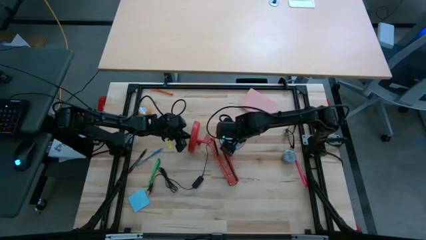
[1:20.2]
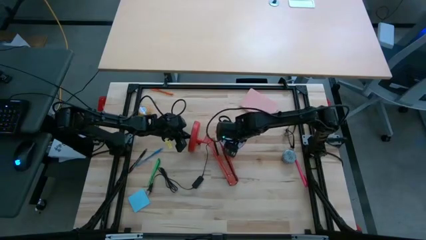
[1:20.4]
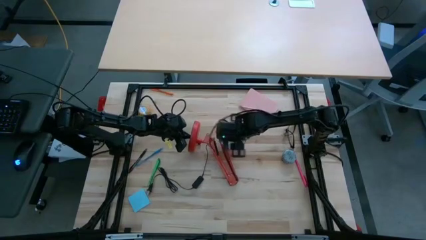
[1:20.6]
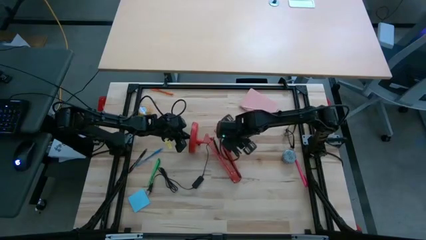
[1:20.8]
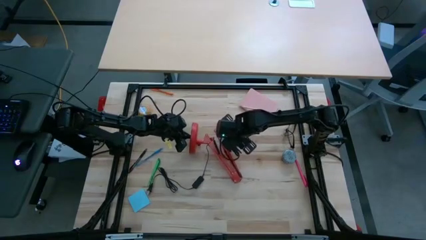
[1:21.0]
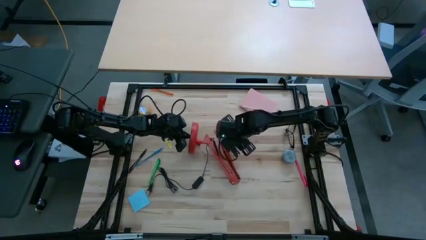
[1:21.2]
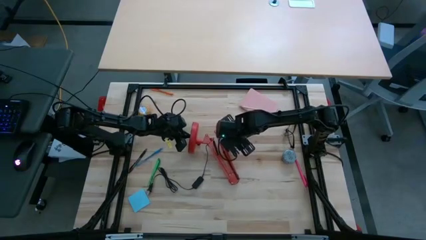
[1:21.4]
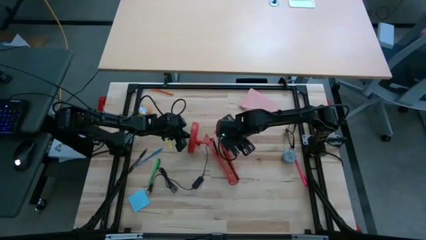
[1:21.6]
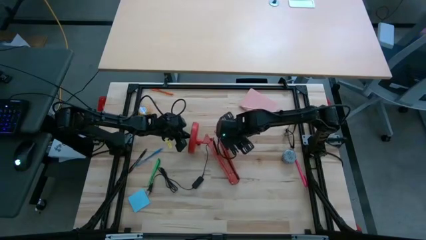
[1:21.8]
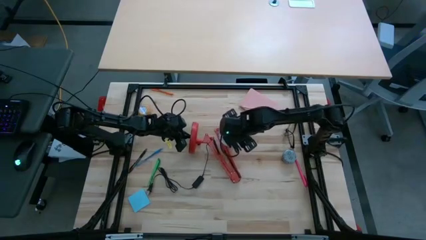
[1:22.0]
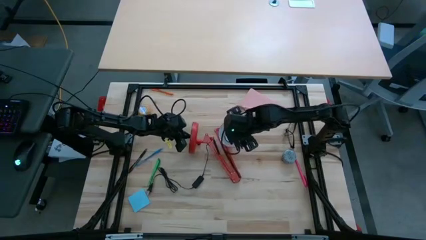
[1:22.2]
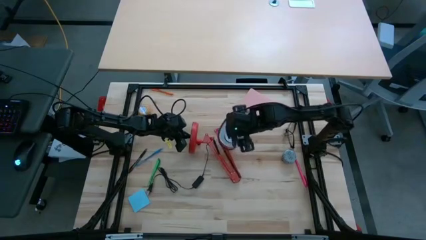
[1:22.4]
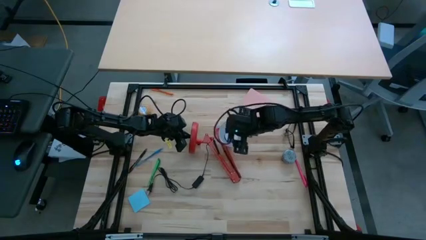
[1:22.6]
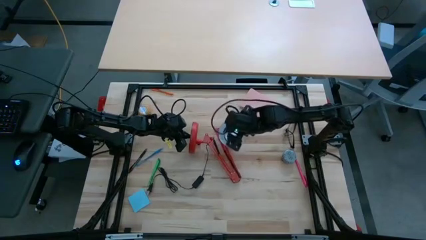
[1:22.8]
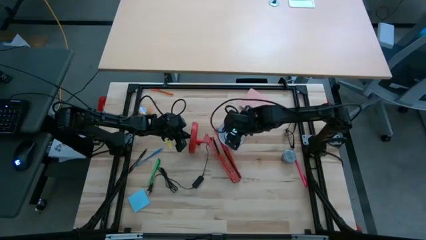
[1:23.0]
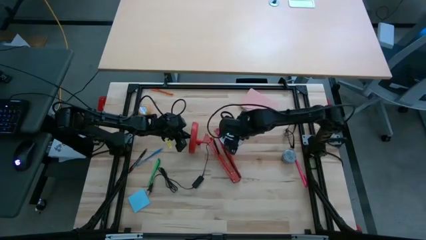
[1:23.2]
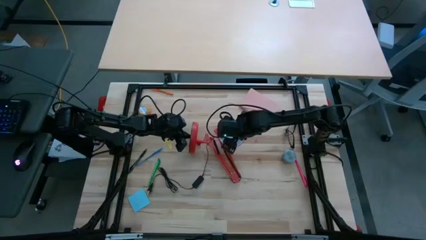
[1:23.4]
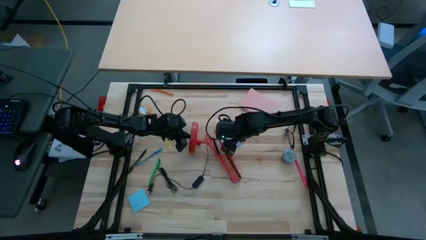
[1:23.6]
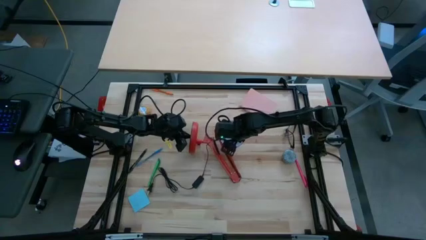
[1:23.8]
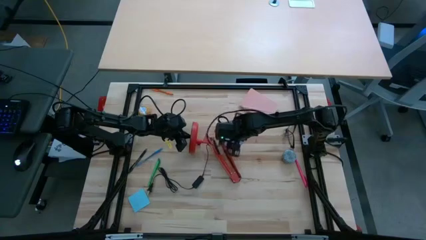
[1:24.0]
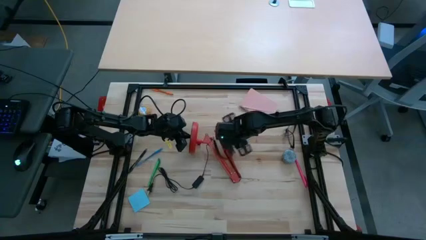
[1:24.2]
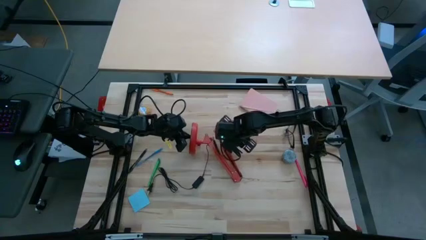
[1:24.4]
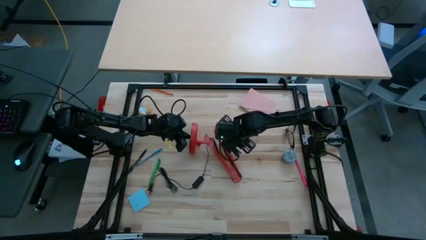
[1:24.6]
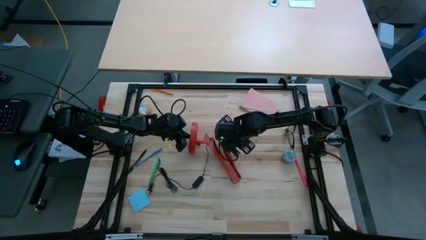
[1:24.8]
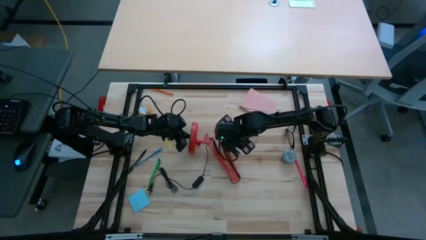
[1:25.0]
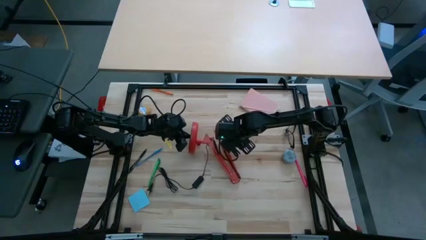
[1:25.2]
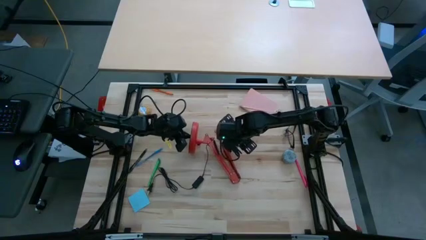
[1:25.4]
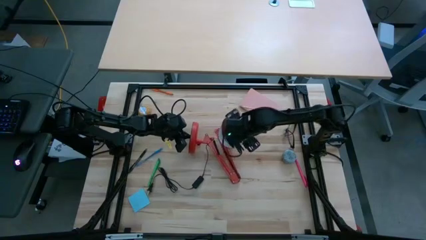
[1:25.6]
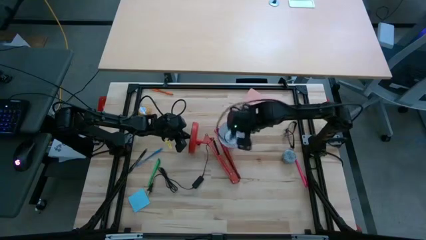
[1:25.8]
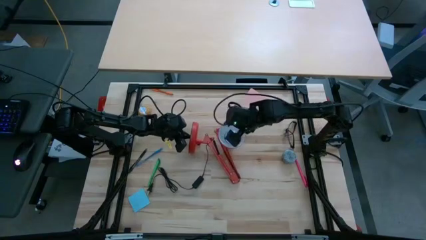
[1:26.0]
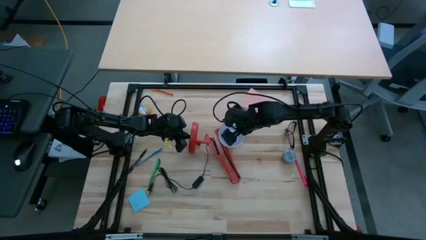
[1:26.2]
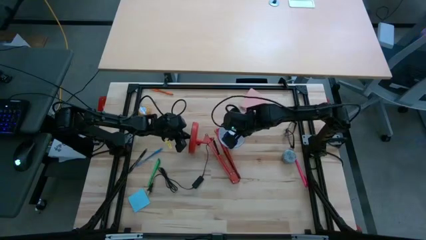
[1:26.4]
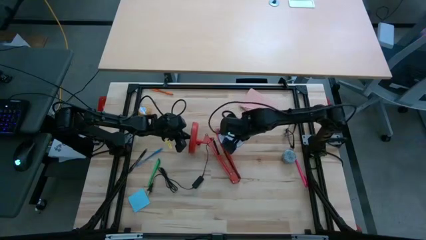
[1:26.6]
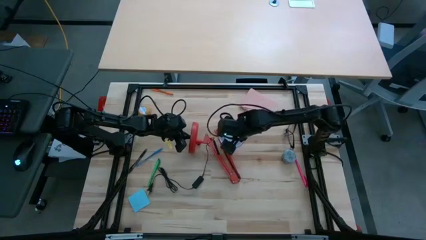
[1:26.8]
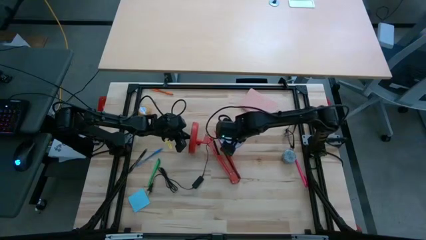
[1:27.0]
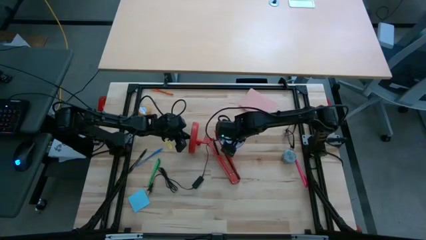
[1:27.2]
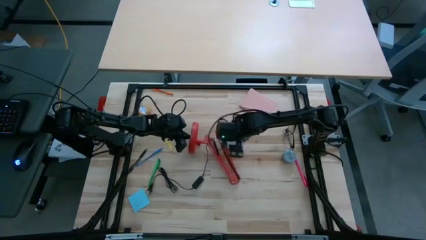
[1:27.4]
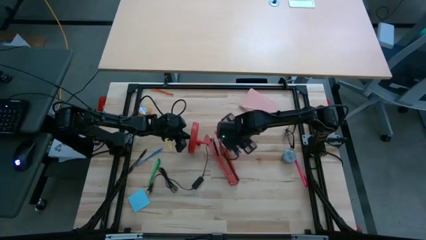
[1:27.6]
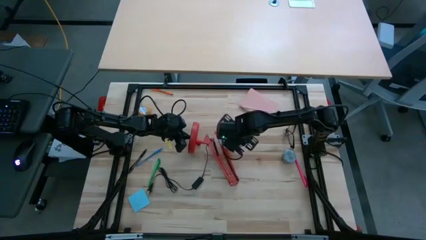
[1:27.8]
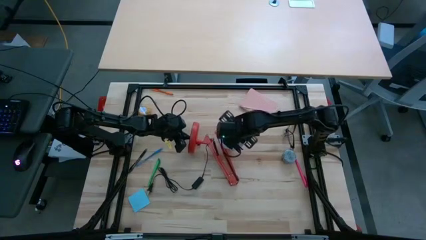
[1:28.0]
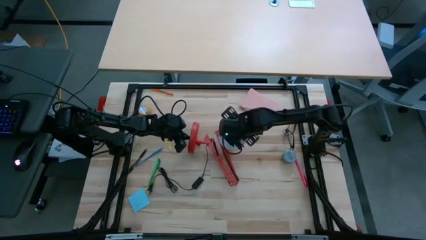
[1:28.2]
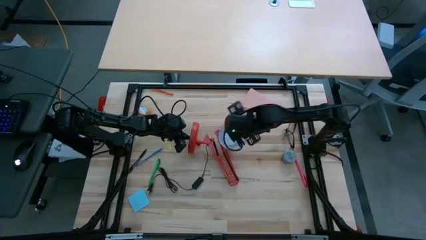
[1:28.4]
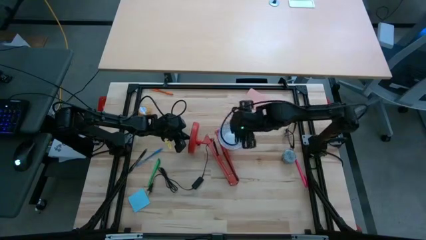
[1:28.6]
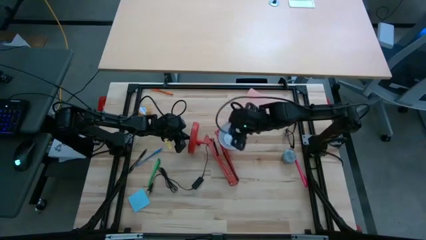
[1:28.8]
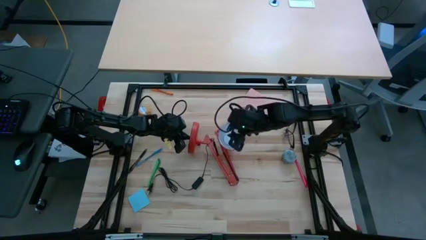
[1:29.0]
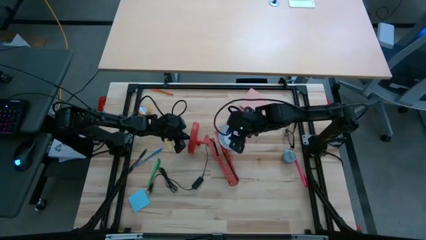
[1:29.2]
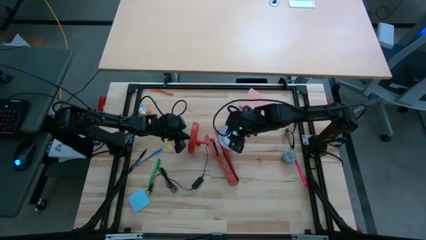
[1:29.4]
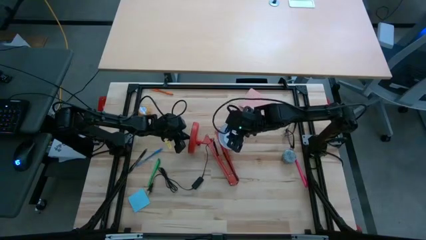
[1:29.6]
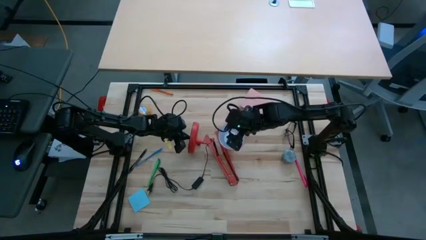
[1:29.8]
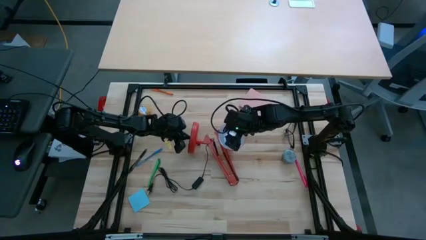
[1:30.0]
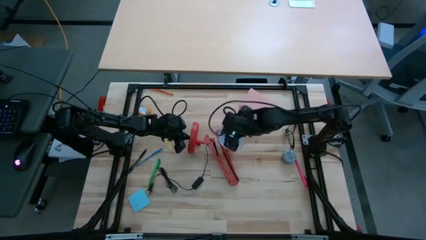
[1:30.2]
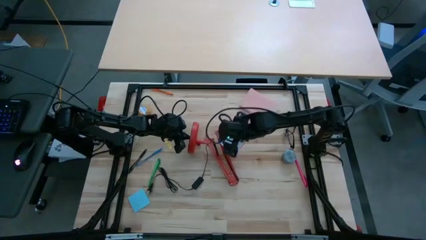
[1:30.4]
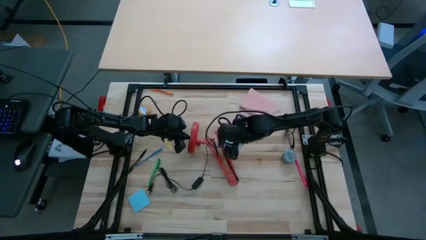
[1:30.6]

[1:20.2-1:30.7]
Task: Screw lightbulb
Remove the white lightbulb from the red lamp

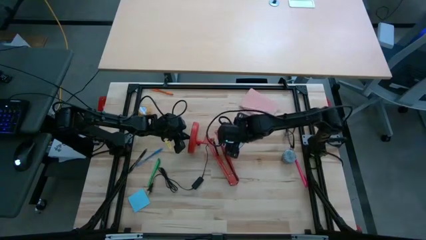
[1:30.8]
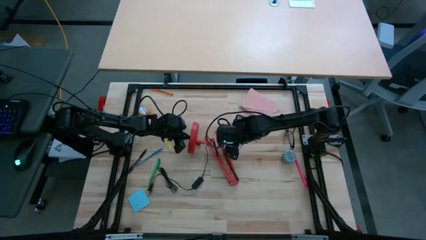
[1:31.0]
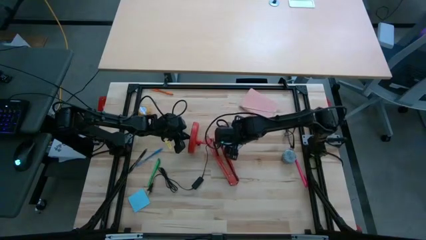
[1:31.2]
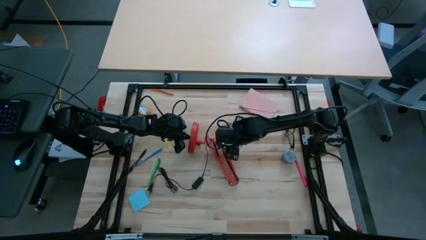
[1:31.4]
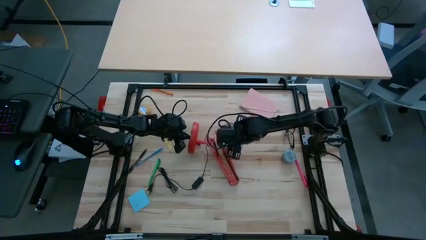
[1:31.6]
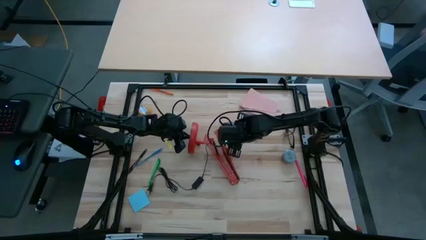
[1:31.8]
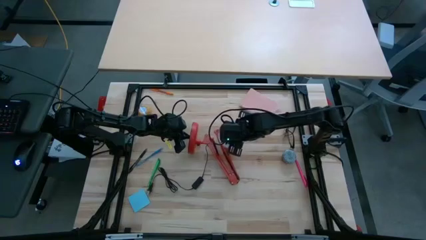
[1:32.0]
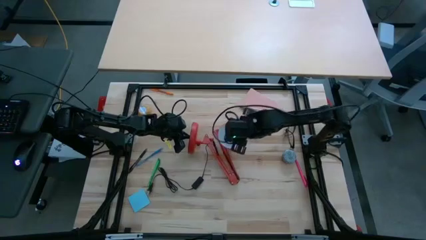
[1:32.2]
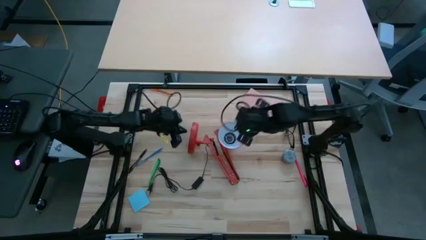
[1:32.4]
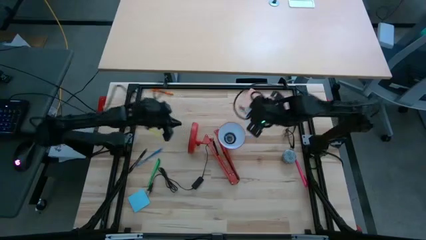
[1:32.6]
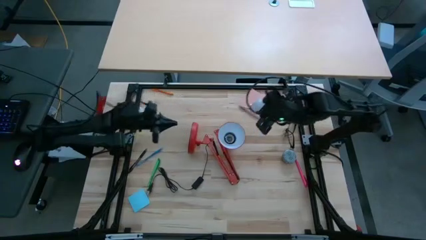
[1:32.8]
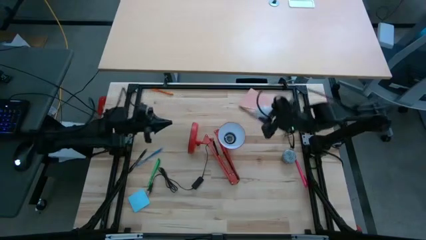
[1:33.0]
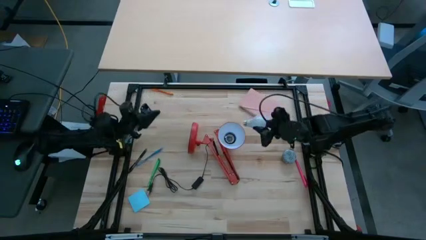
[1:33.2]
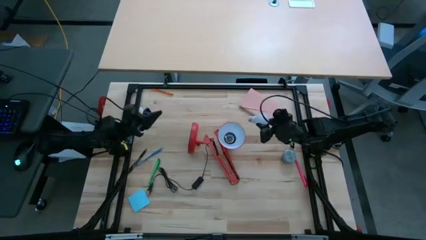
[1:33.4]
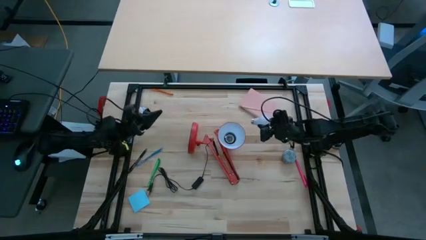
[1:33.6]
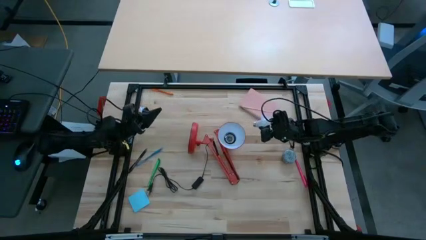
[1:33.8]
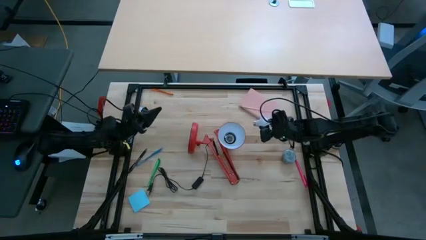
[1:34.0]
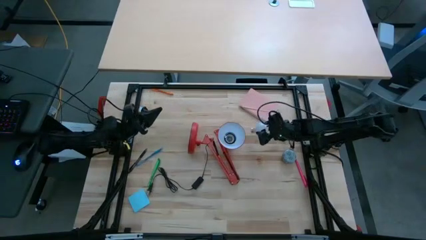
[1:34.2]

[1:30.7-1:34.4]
Remove the white lightbulb from the red lamp
